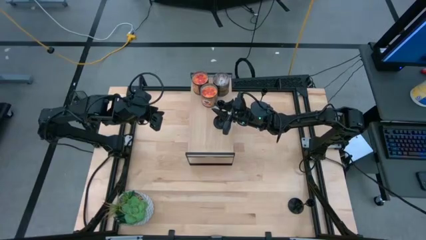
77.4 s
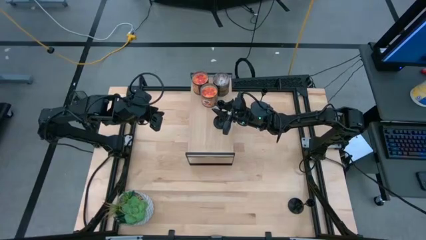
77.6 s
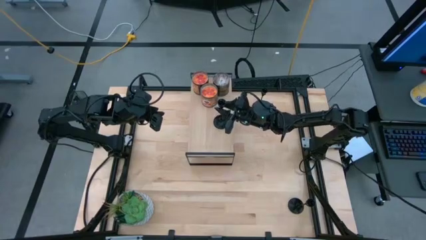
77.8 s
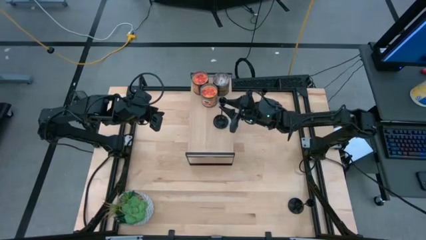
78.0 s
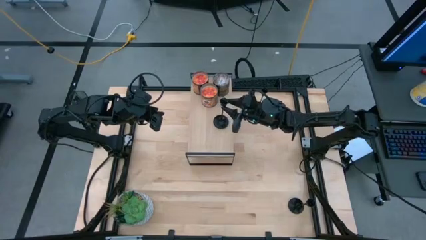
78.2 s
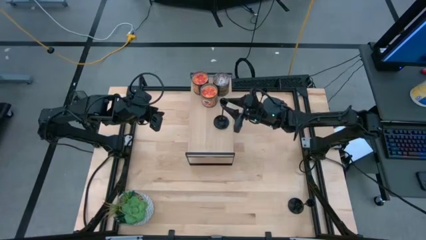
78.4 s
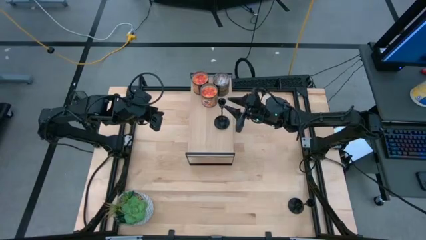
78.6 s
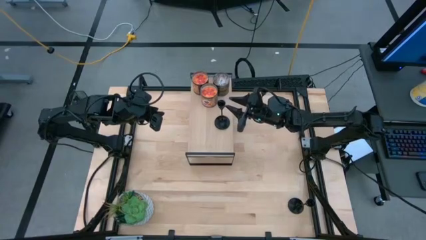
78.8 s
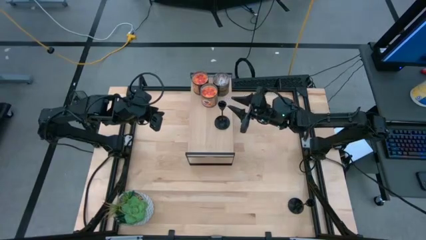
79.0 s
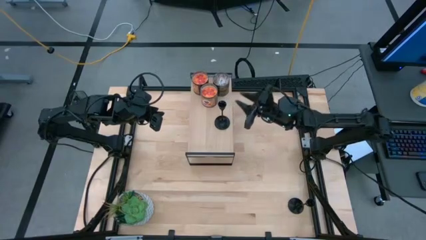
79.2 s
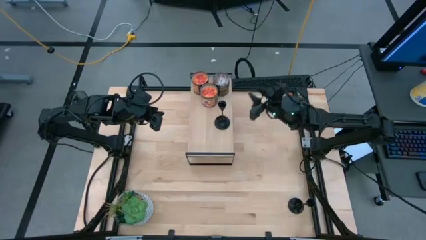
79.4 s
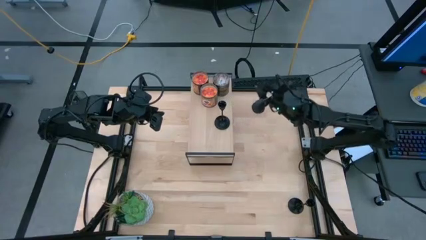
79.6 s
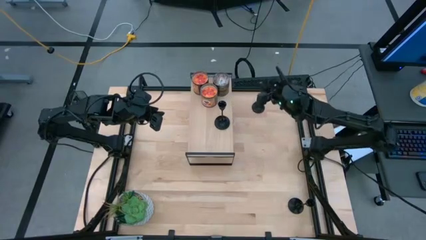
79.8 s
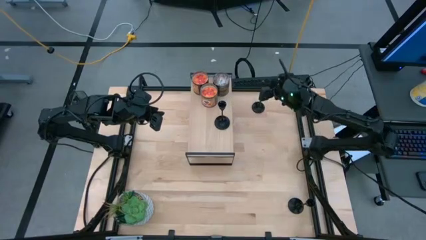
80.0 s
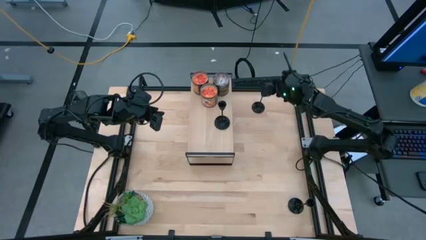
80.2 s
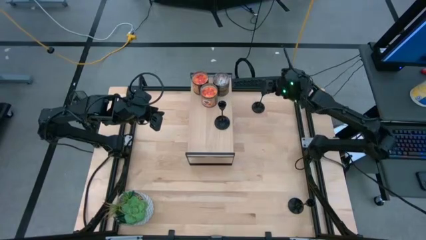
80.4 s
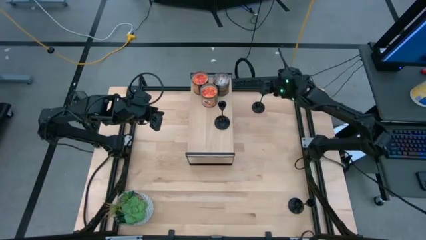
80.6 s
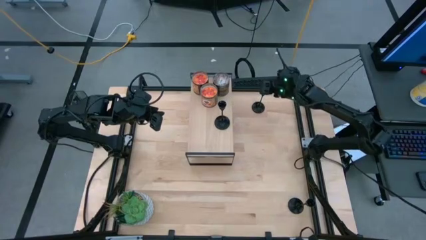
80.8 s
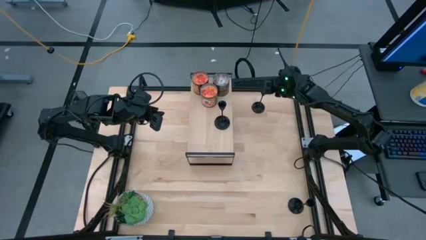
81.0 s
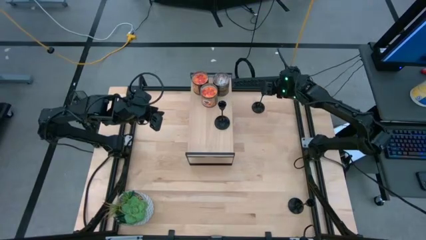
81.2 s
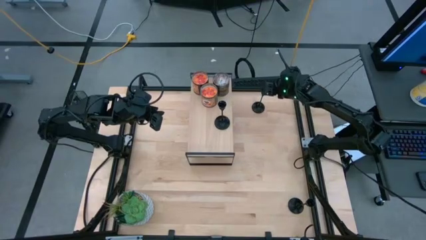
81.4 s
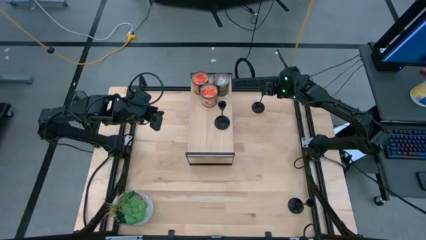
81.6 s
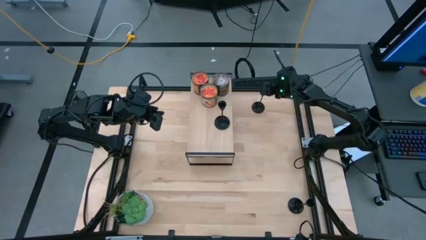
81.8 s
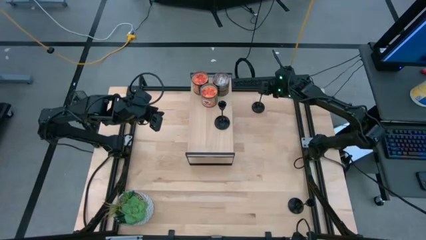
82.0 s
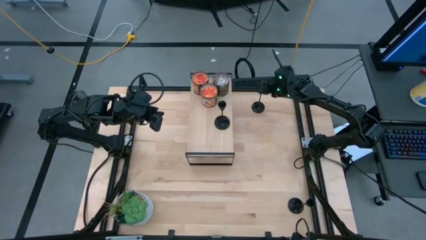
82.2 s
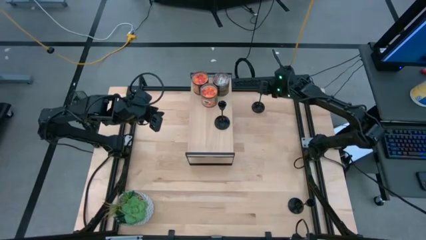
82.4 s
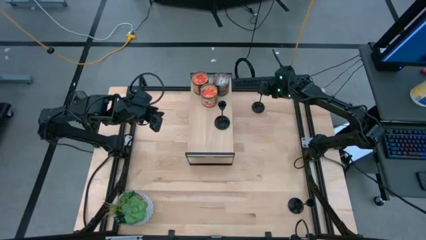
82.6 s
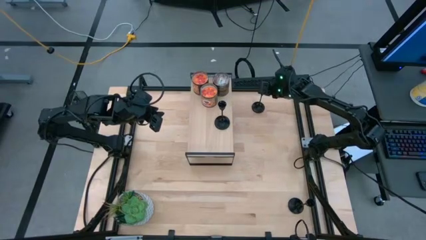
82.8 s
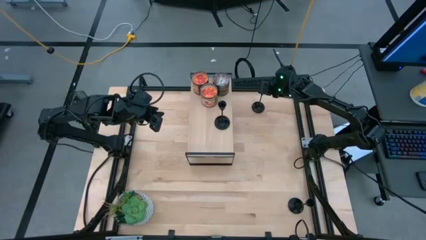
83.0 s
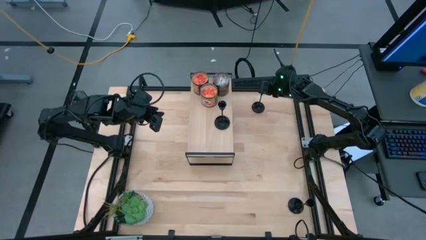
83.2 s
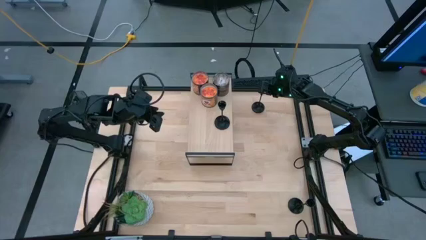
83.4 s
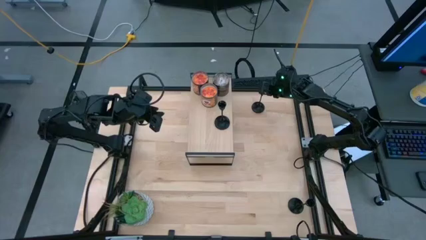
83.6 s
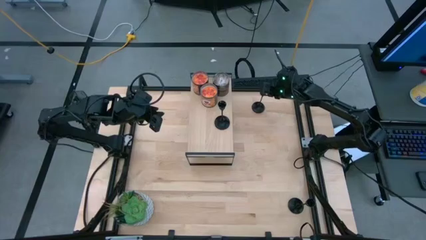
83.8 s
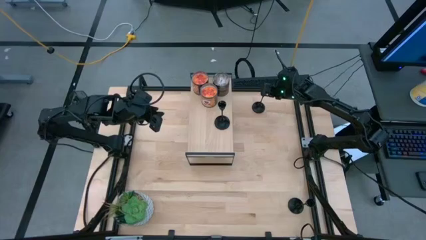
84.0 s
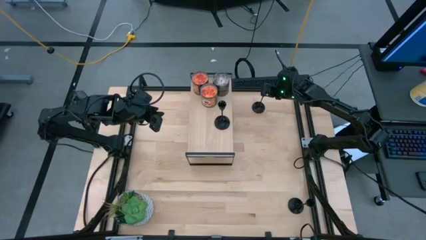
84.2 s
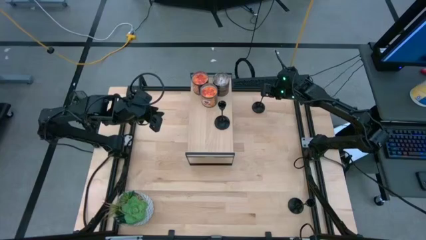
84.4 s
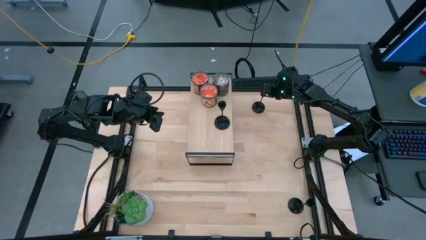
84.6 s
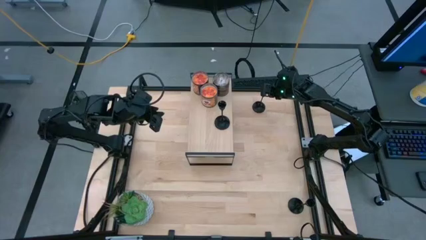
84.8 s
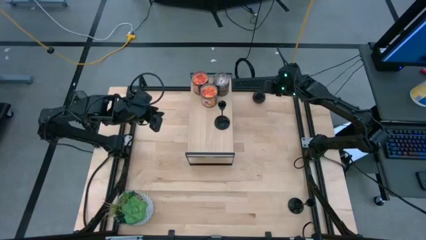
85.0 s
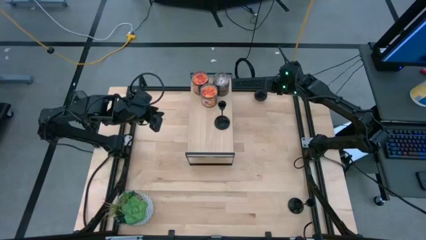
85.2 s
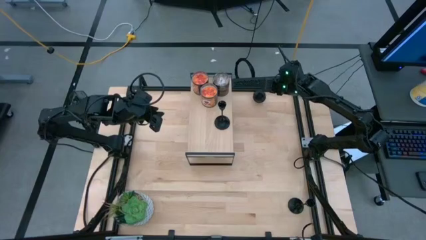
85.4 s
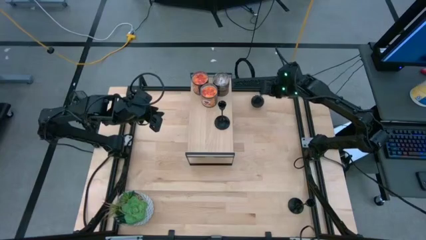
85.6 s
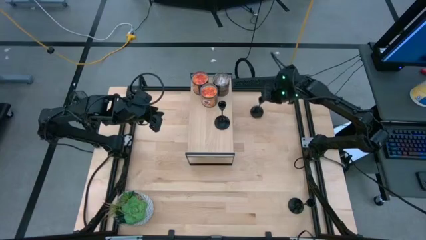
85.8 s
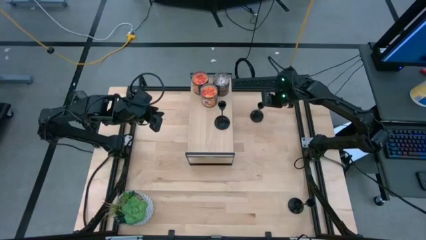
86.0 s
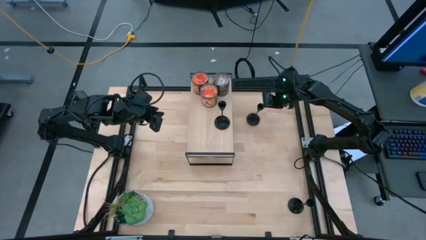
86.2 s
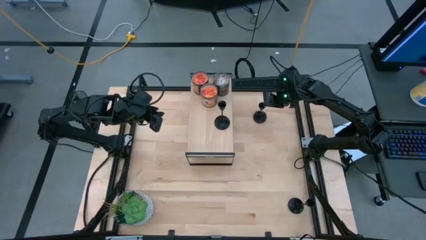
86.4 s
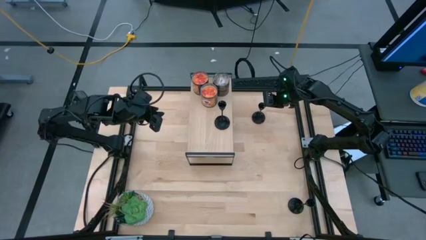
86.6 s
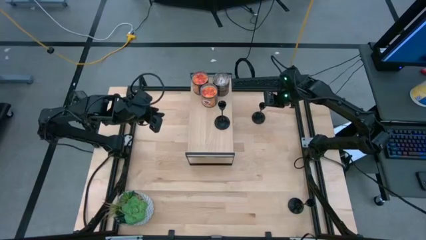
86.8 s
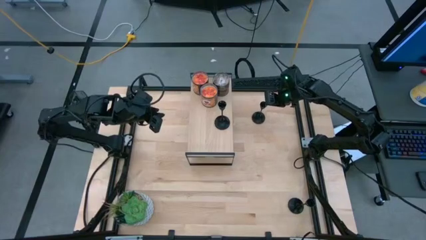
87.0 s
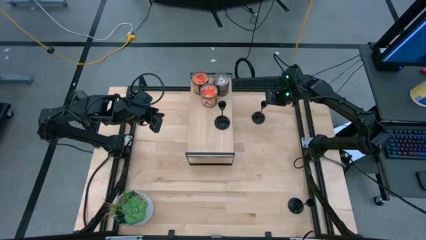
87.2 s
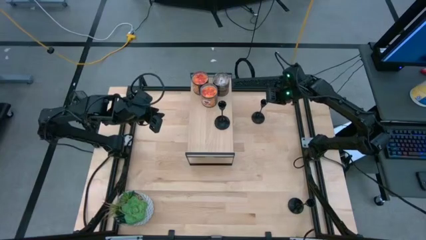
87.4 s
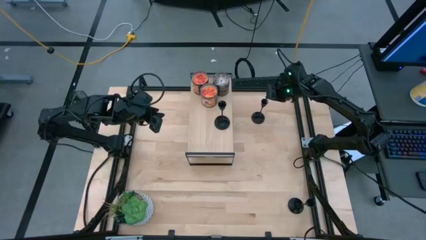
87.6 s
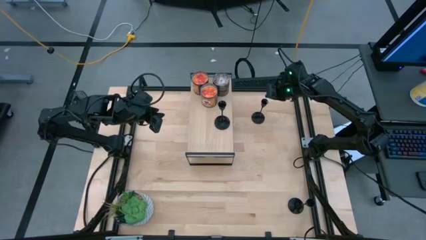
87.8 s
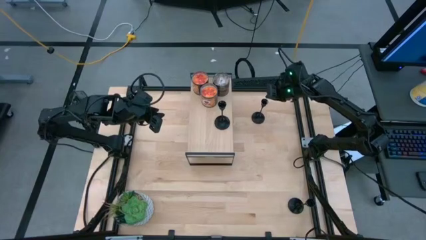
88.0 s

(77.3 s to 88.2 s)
Task: Pick & Place candle stick holders
Align the top black candle holder with the black candle holder on the shelf

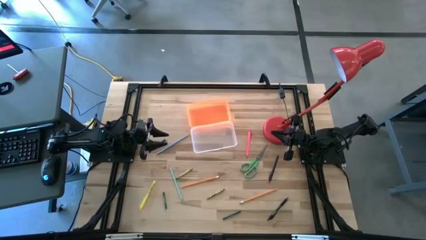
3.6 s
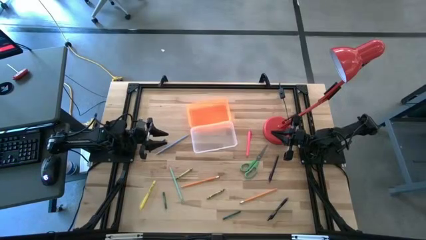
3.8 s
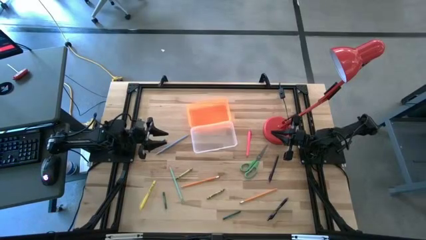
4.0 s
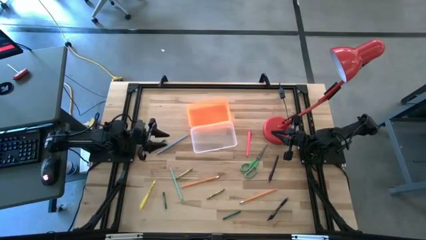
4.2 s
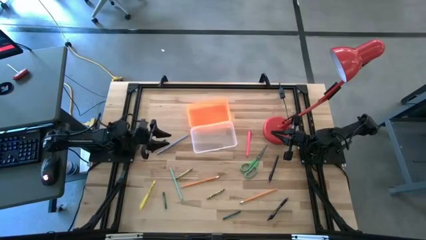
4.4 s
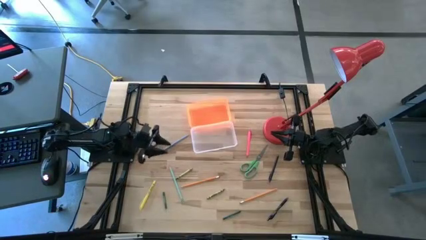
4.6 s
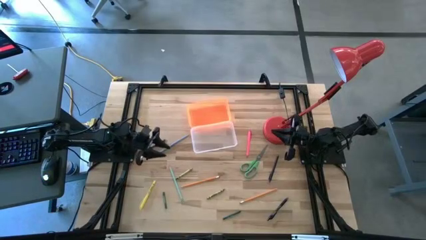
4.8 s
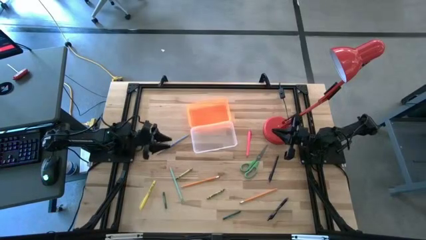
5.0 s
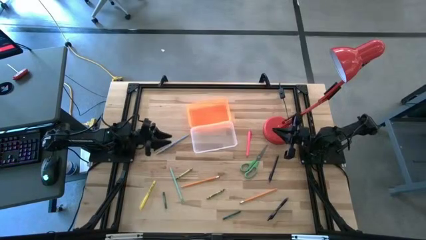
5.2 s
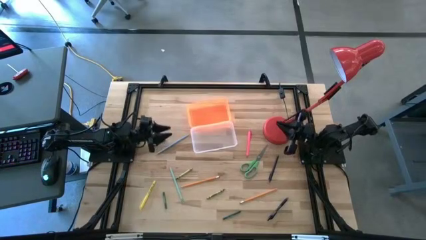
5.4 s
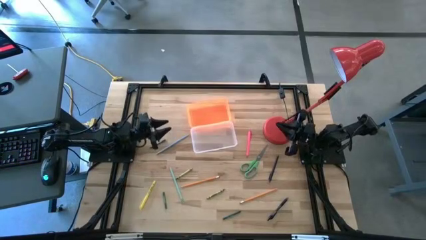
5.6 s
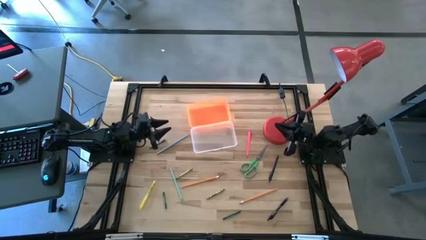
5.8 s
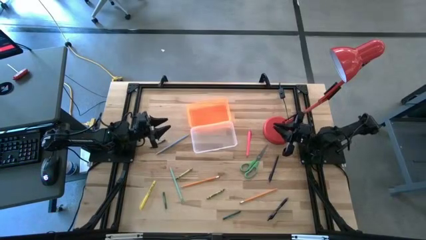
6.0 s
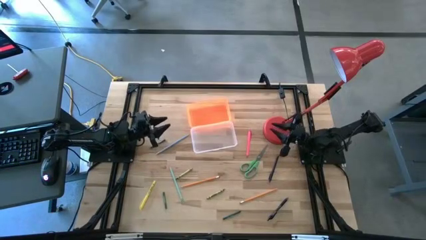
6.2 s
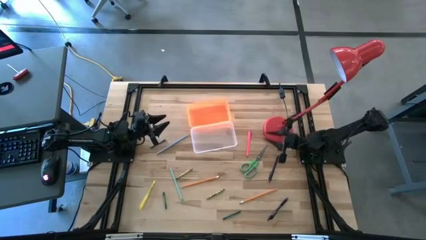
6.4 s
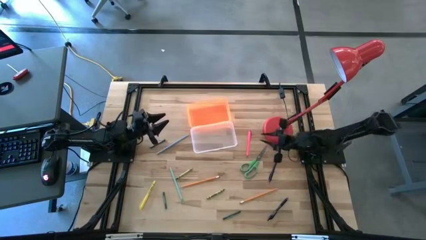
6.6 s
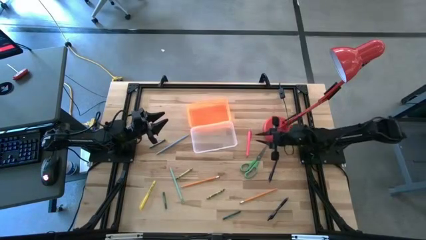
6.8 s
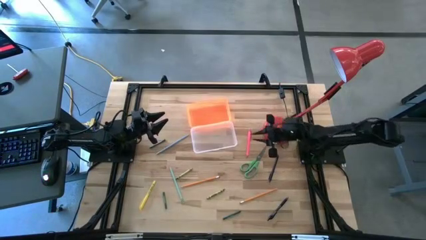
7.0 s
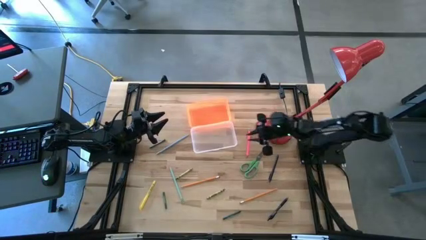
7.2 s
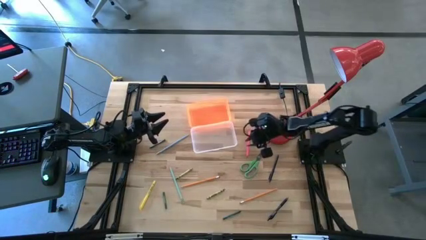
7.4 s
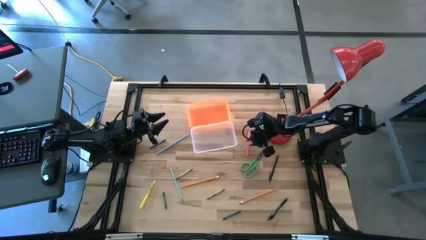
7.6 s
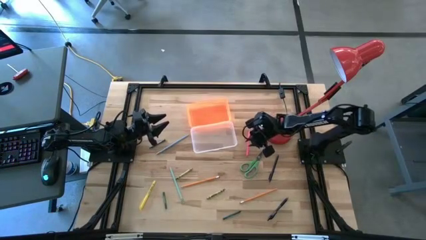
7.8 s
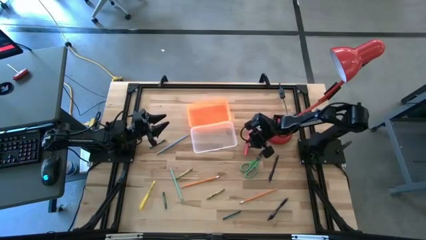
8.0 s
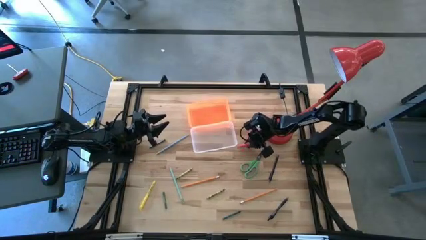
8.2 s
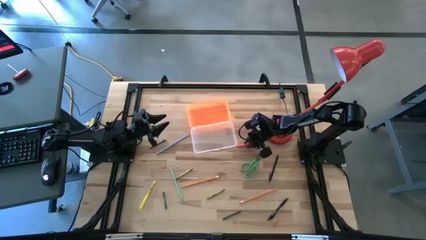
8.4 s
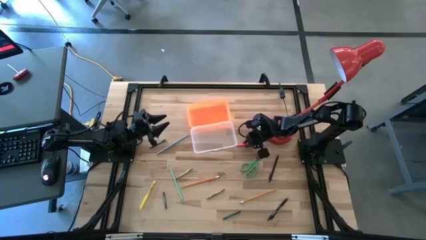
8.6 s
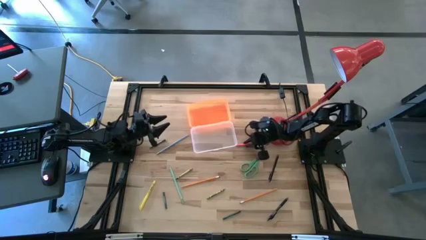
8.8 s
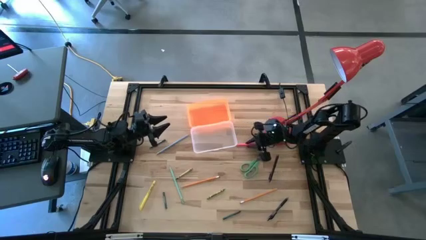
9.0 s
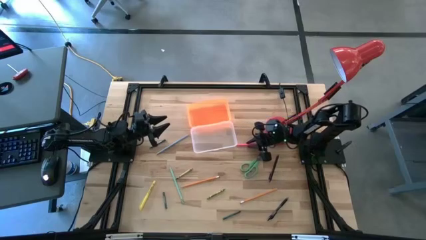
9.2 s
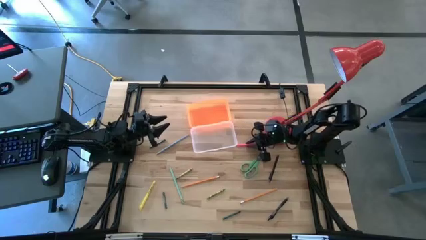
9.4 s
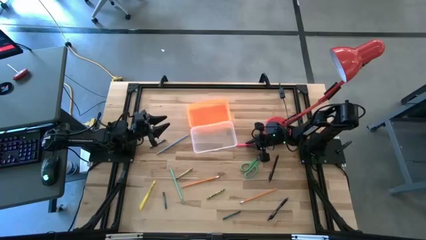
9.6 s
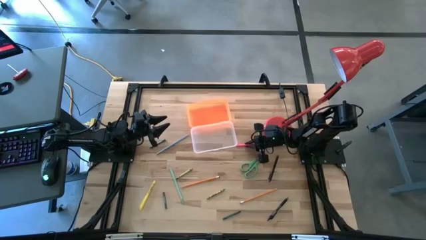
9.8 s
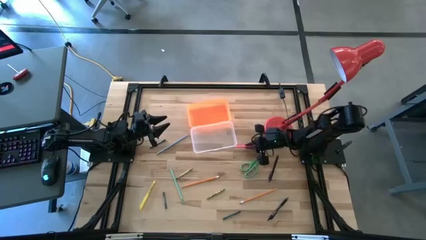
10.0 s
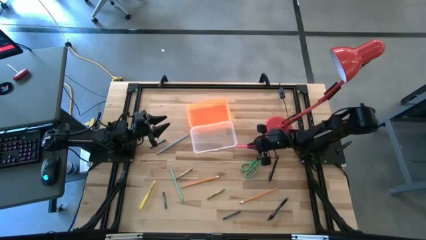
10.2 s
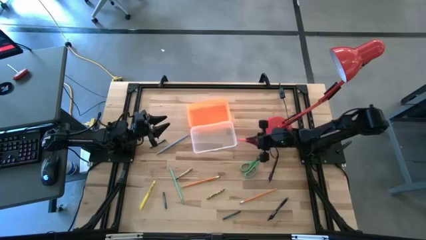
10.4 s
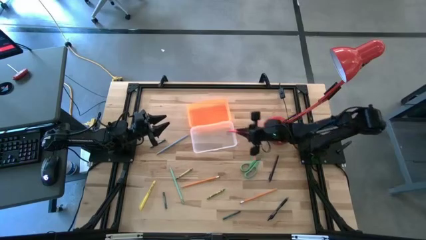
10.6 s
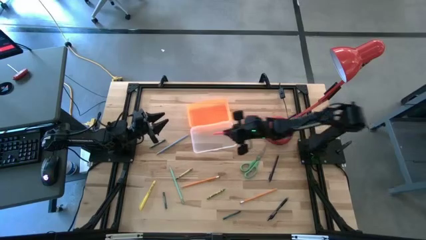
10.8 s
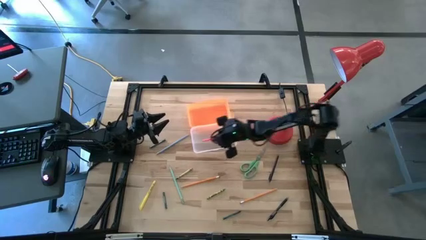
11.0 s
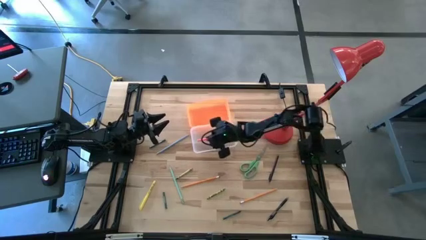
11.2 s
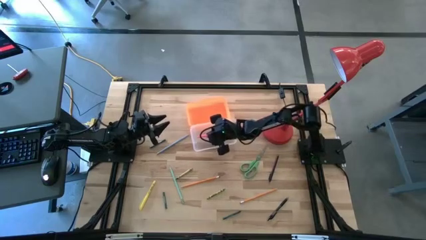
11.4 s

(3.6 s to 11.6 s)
Task: Pick & place school supplies into a supply box
Put the pink pen into the orange supply box
